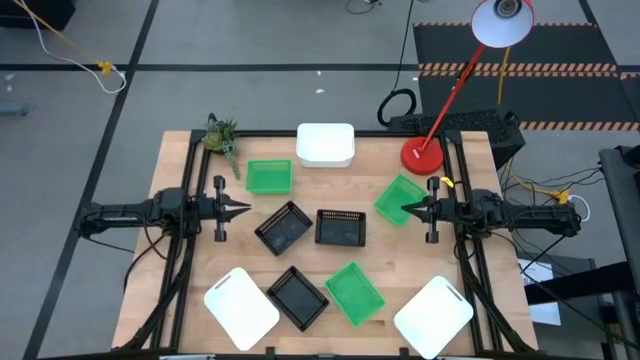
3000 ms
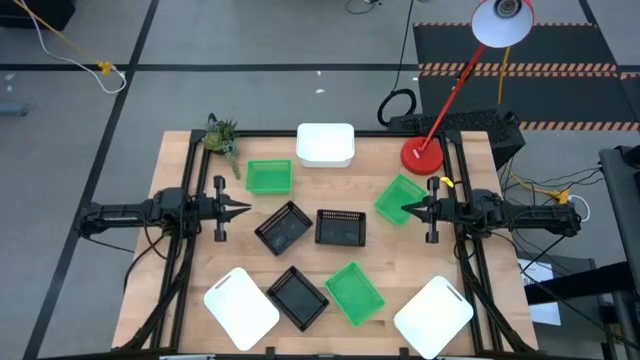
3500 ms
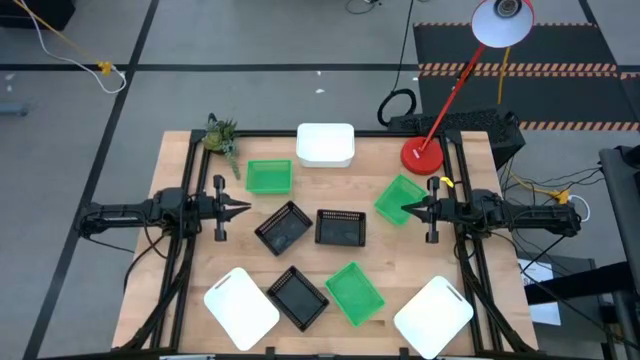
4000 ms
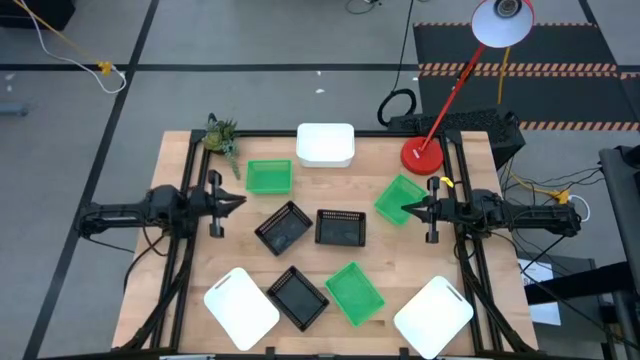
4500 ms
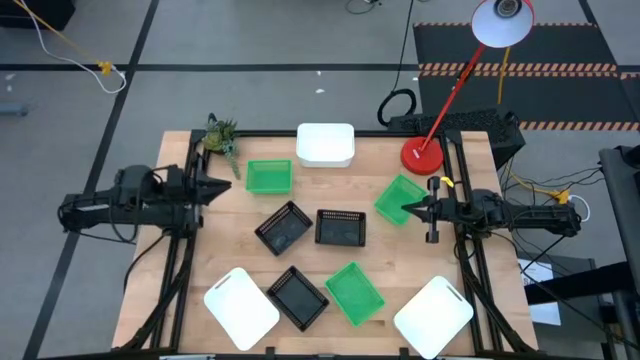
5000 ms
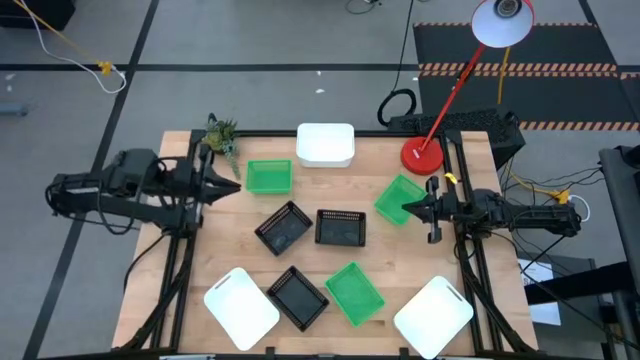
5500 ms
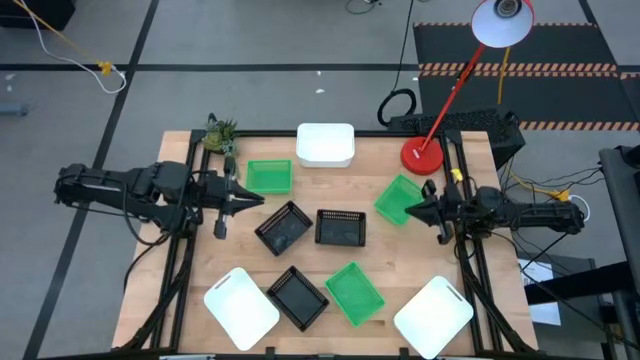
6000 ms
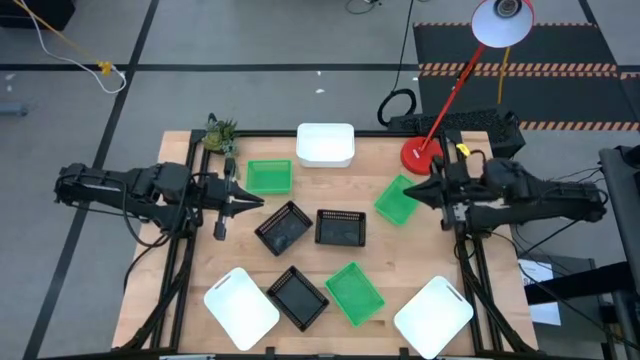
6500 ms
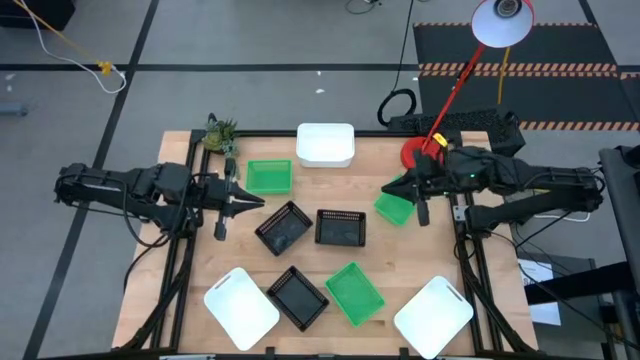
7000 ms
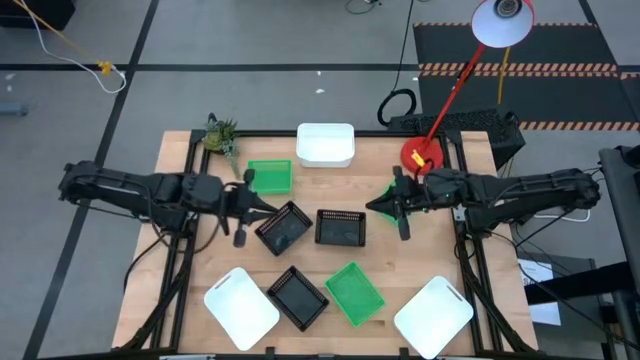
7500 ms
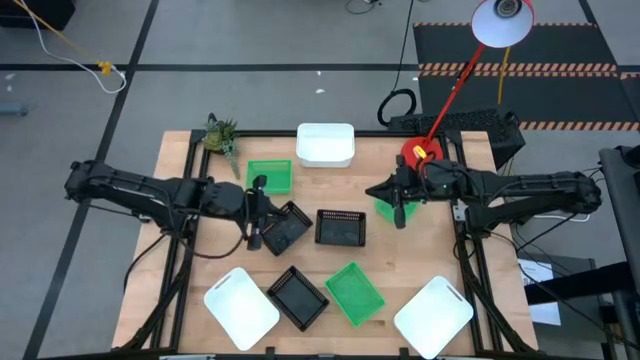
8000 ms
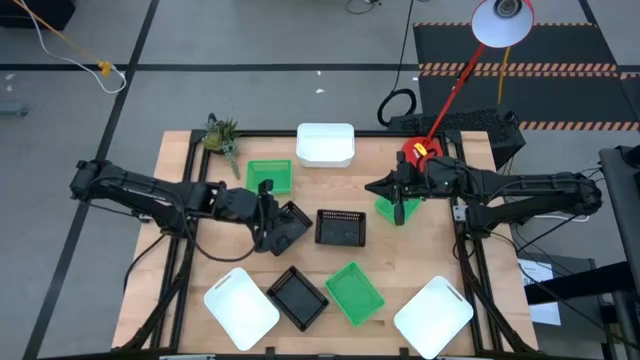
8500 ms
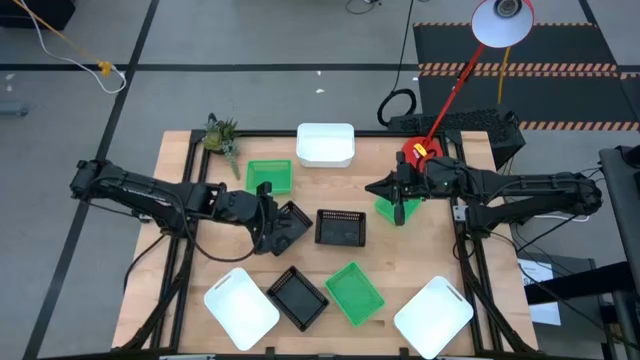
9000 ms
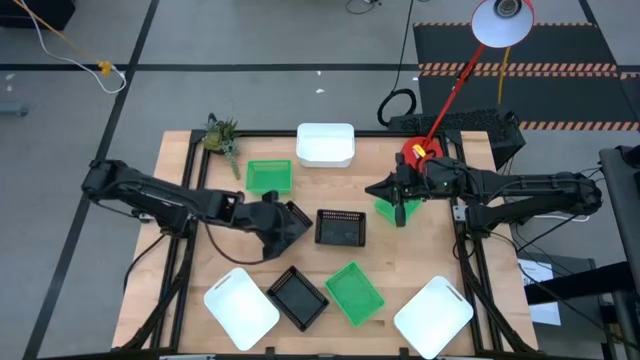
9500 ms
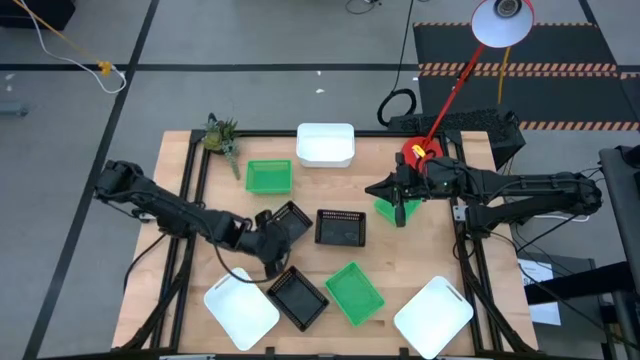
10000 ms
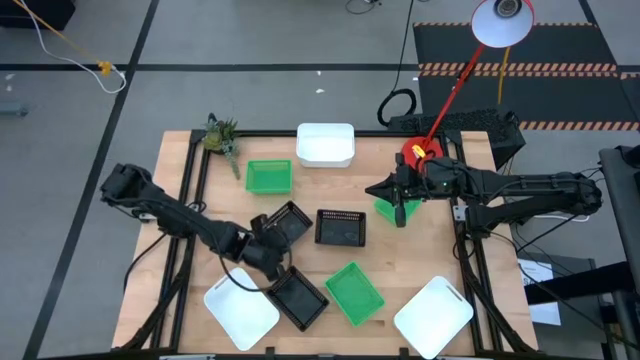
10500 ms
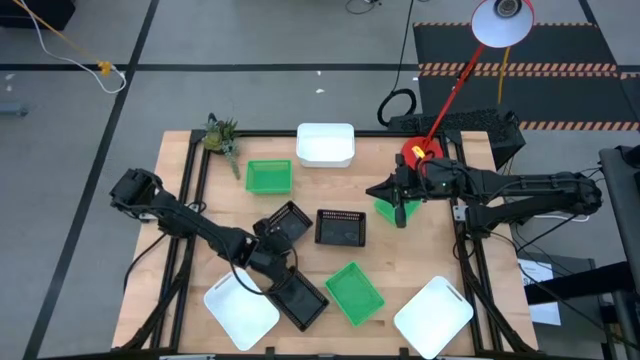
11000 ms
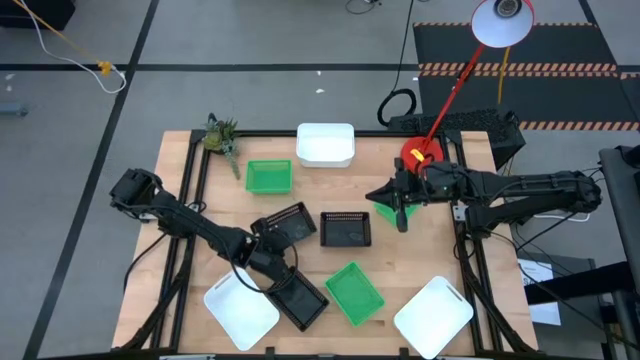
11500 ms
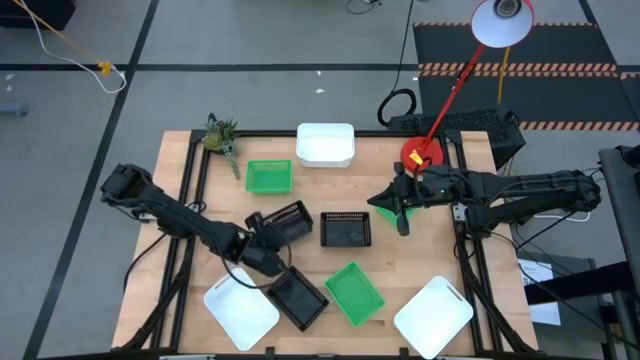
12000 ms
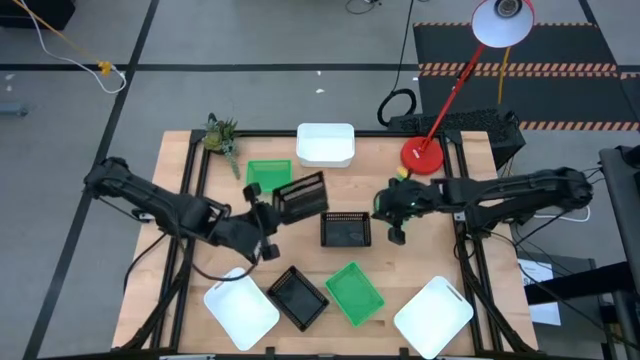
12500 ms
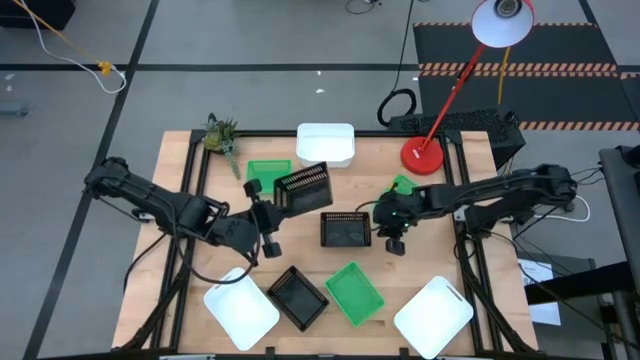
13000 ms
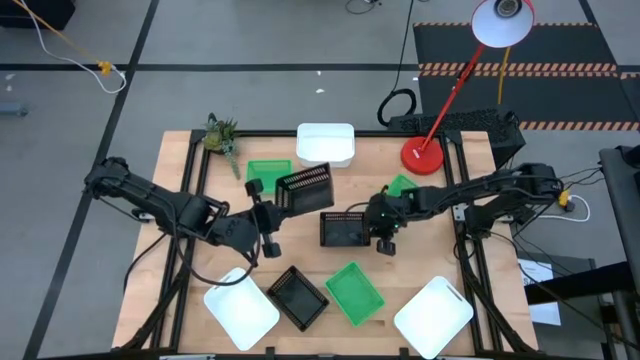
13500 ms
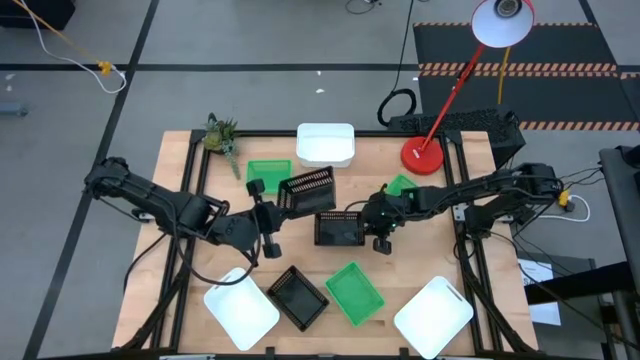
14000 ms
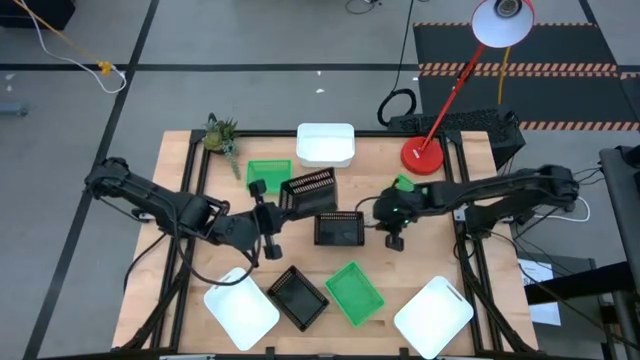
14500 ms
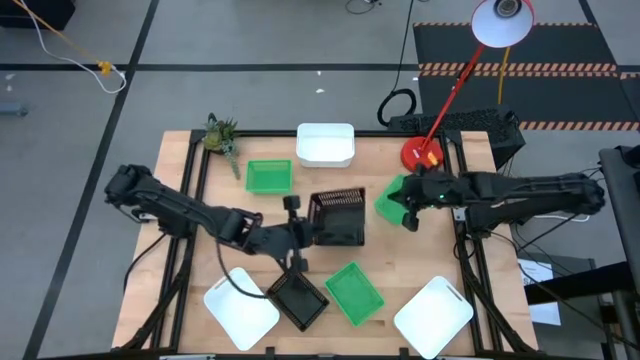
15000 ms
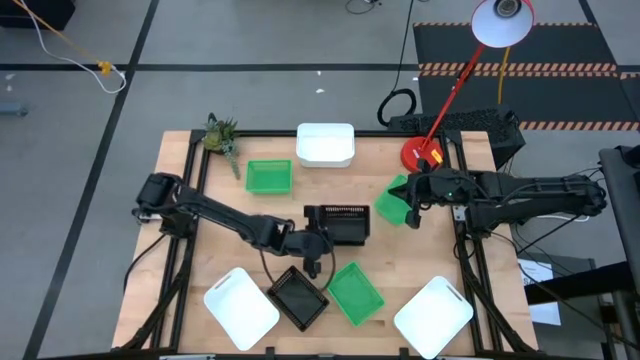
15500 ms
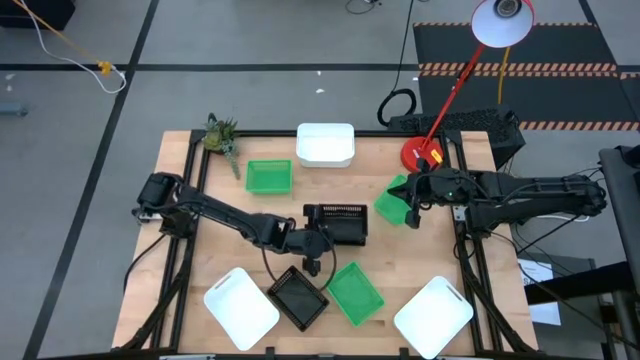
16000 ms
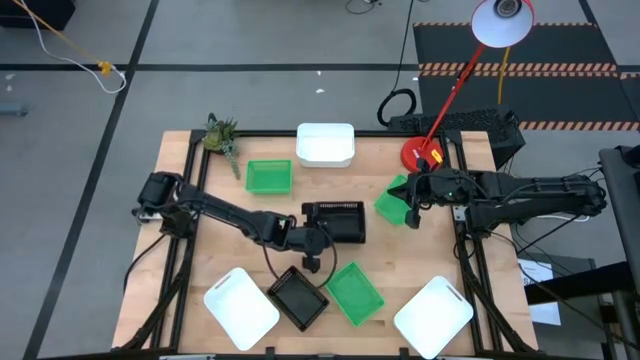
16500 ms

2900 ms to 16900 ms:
Stack the top left black bin on the top right black bin
